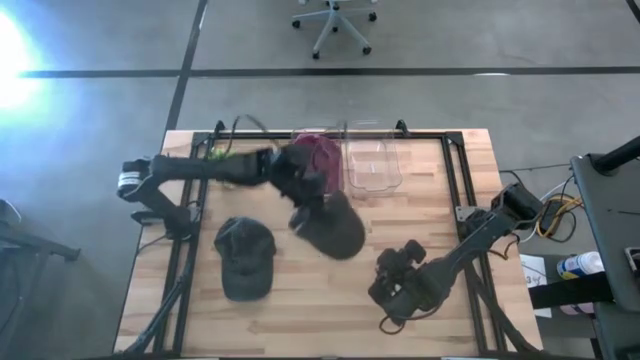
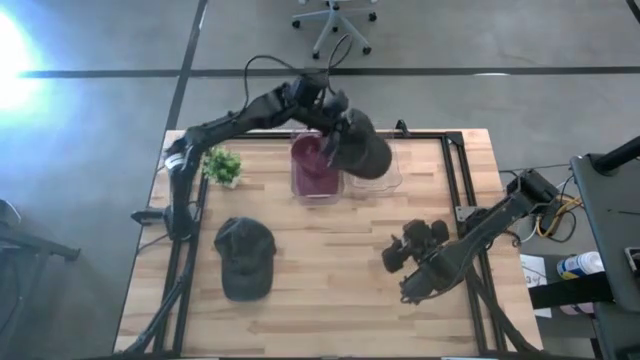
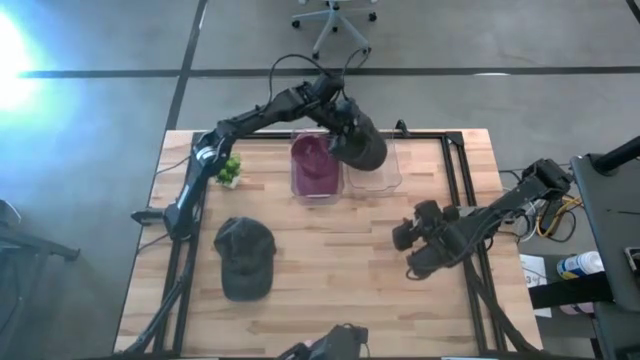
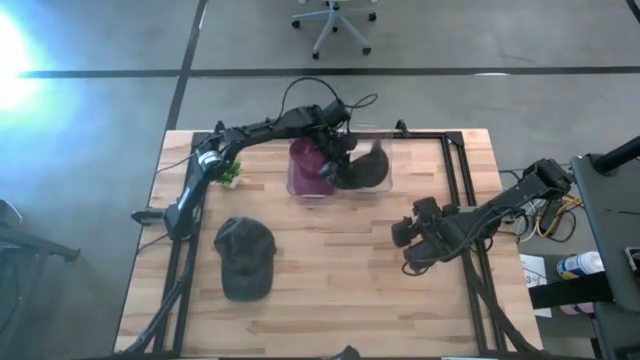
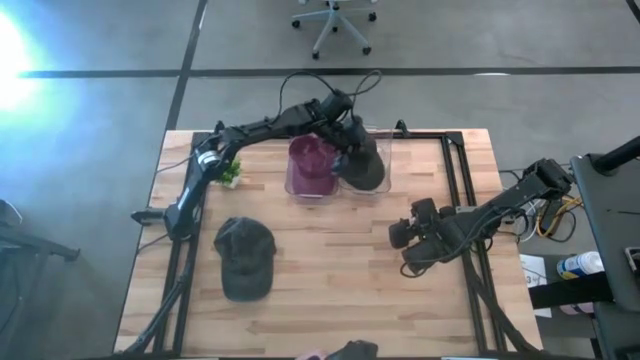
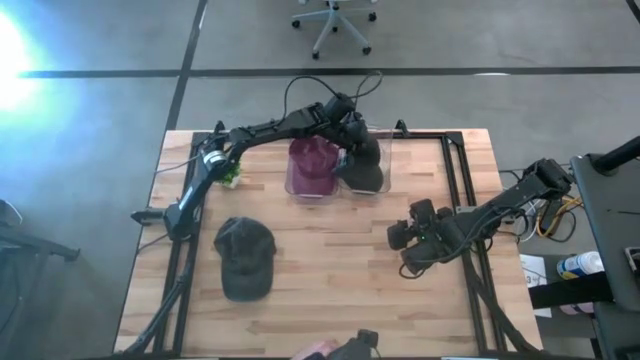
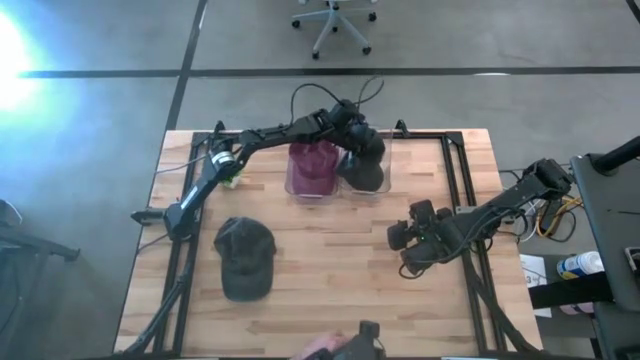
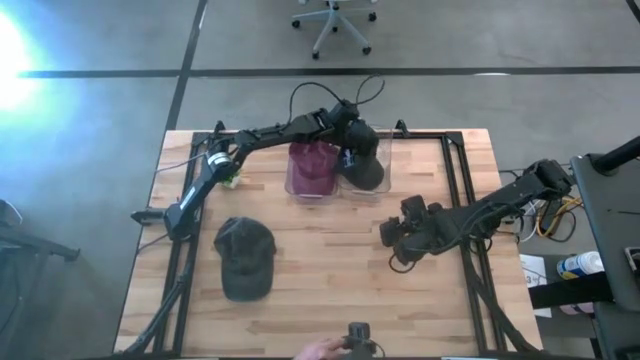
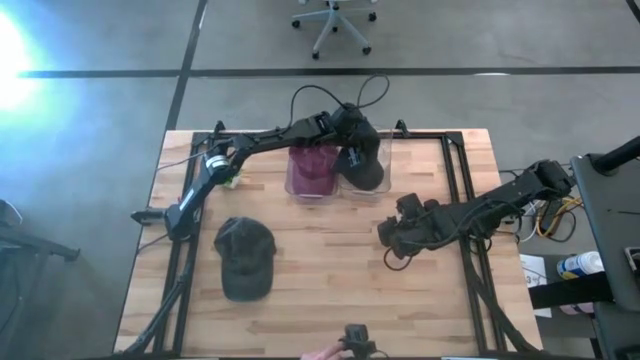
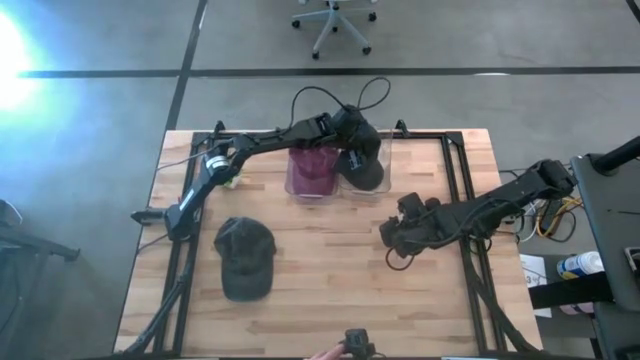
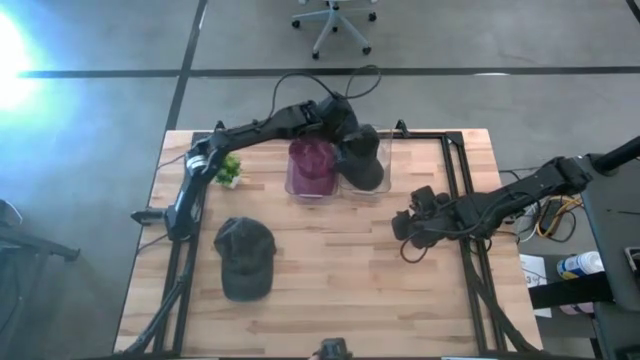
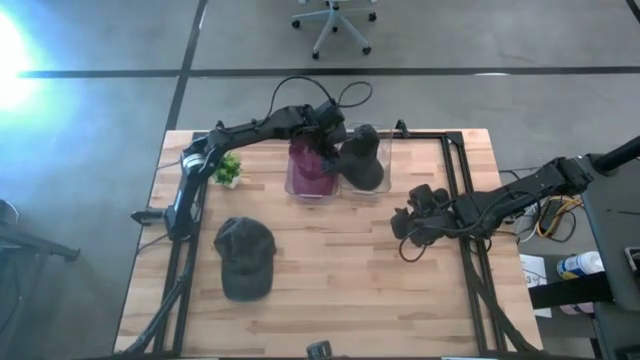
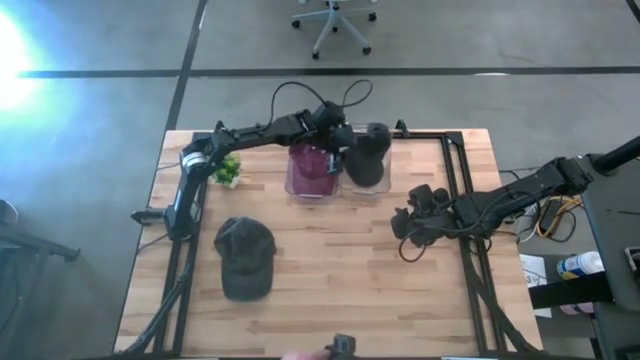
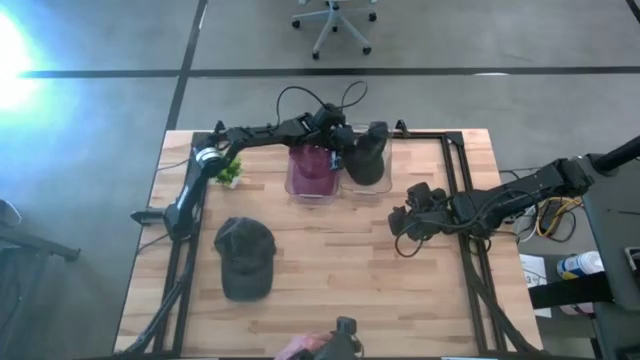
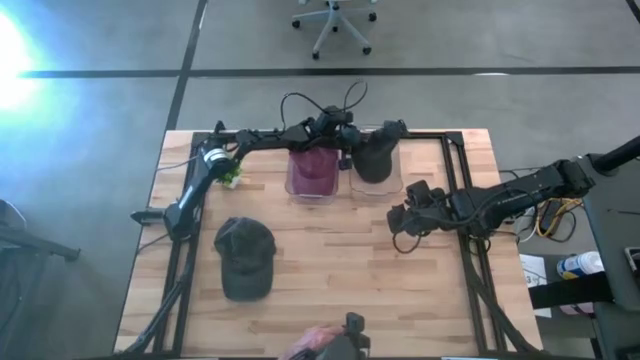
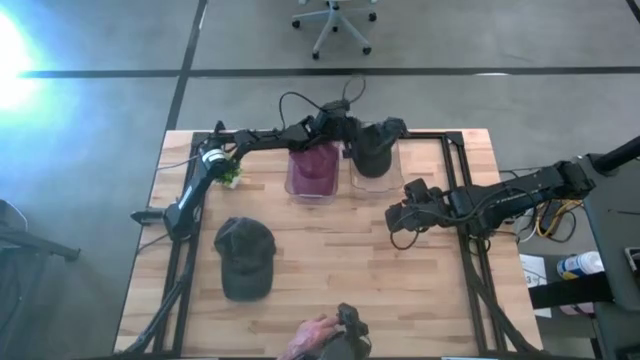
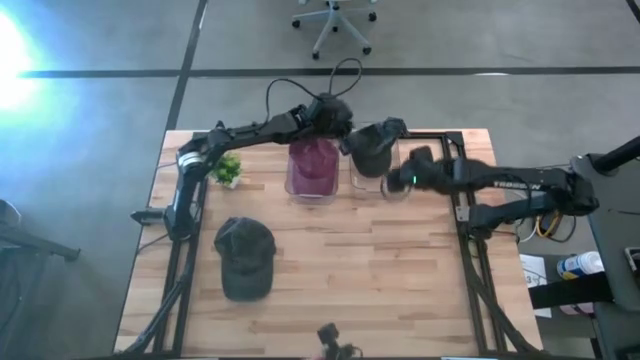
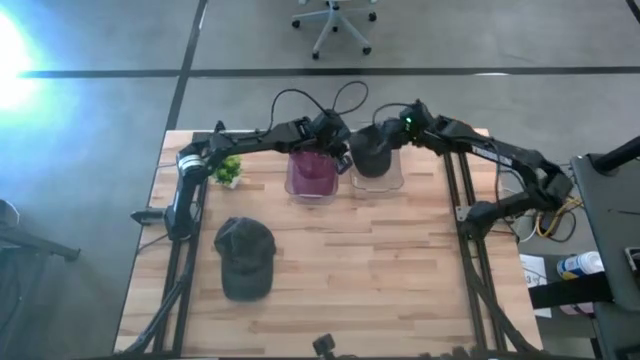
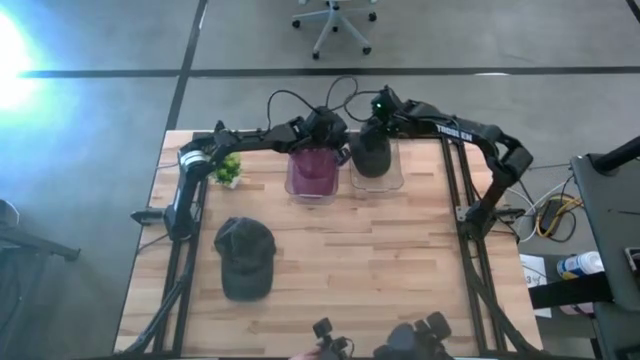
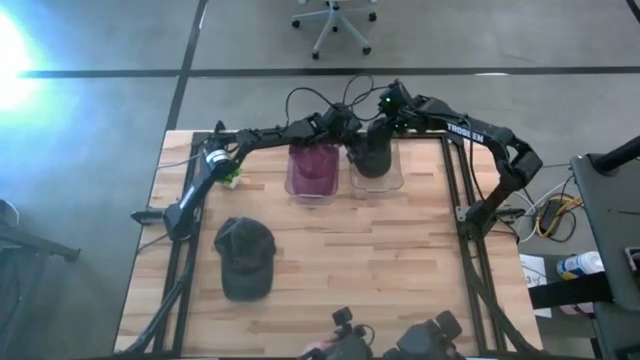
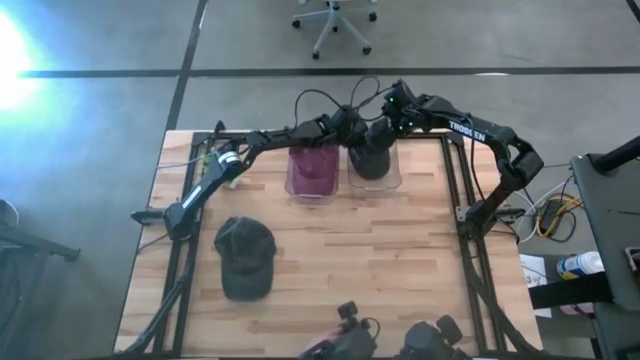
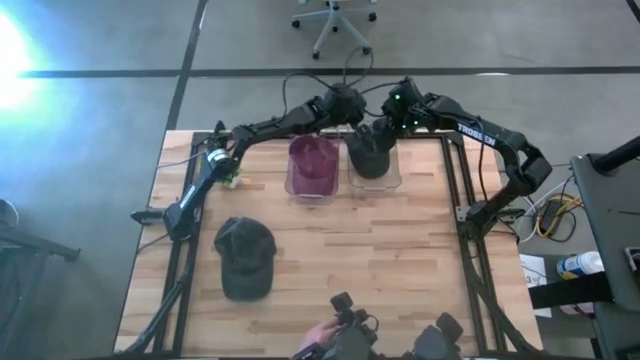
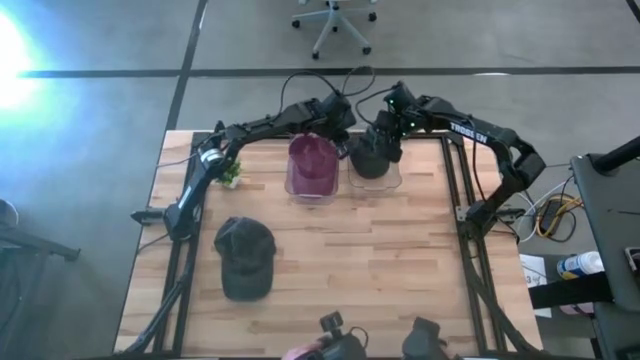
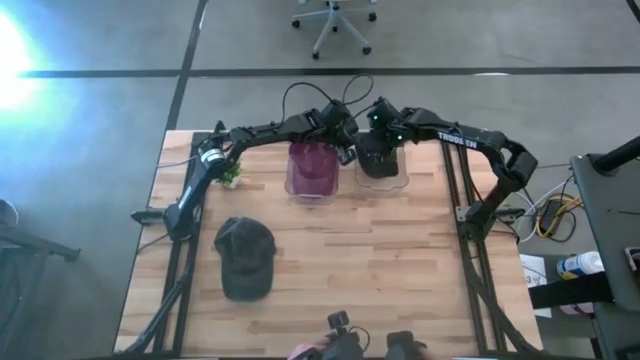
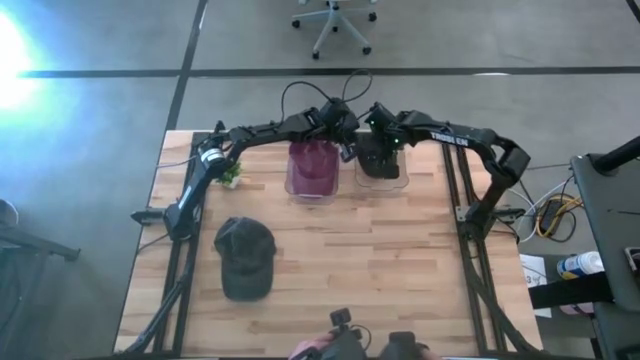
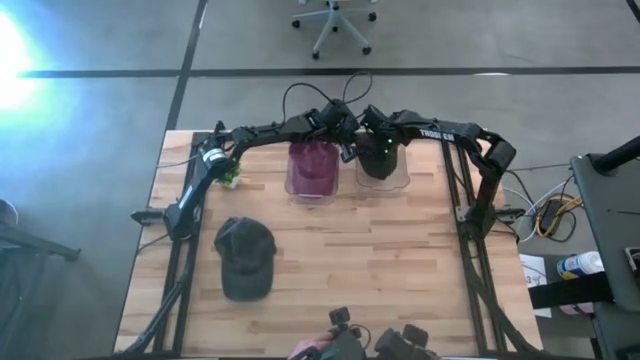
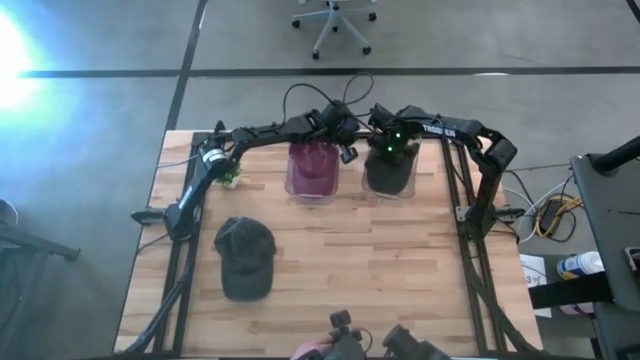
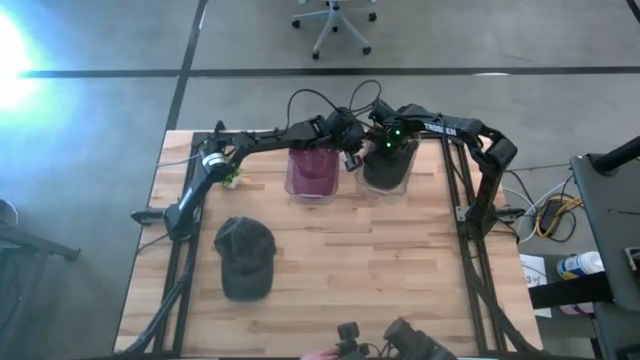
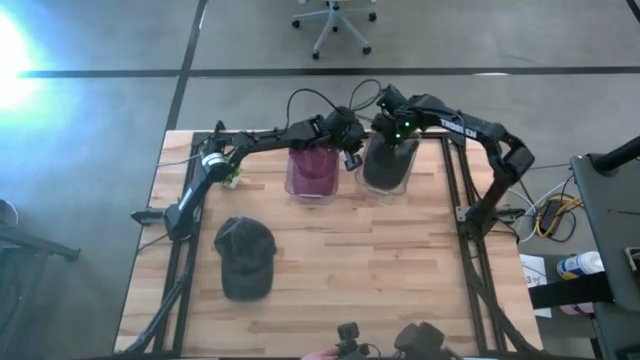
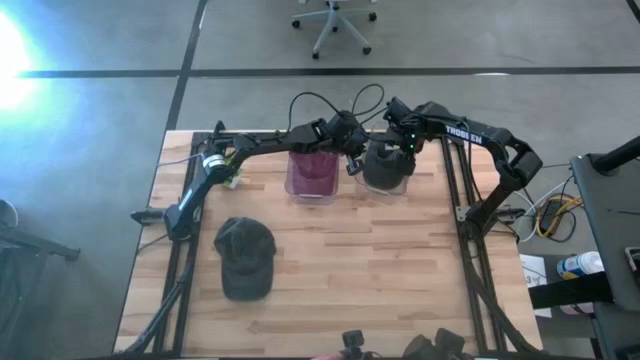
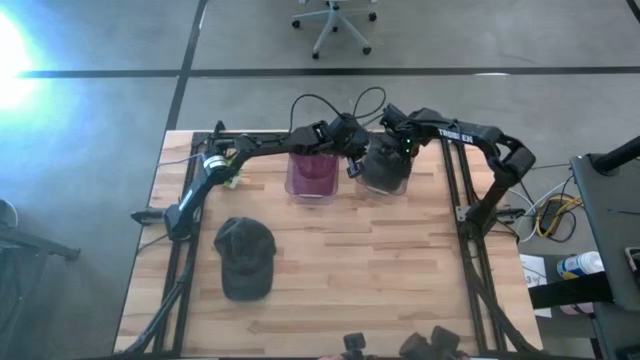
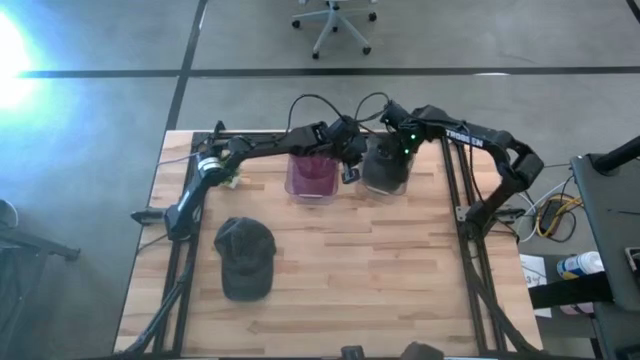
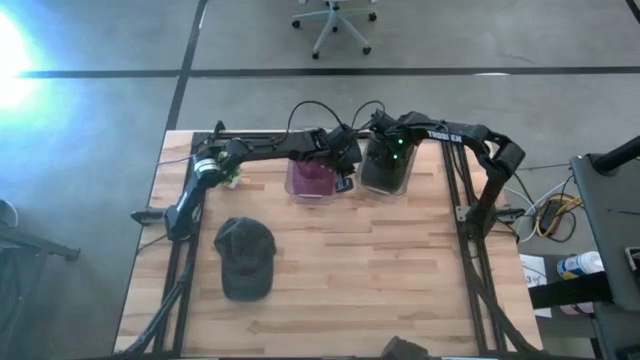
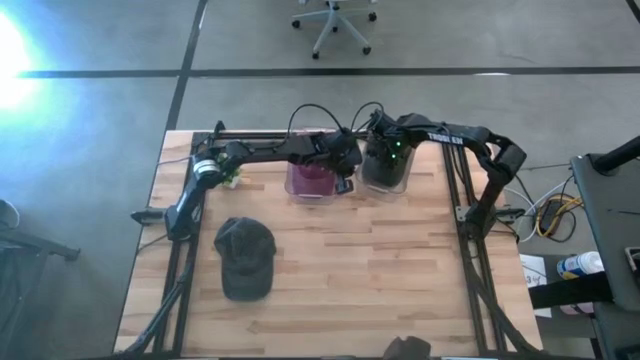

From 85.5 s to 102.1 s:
Task: Pick & Place hat
Put the right black cap into the right transparent bin

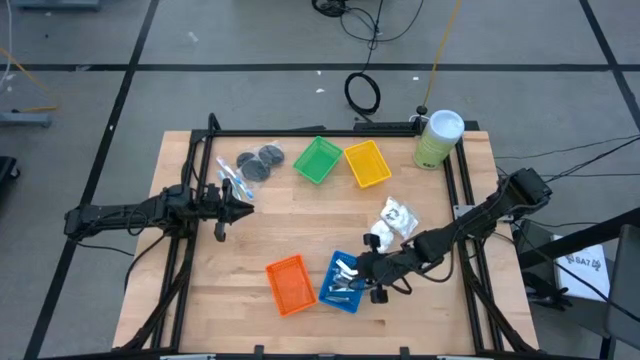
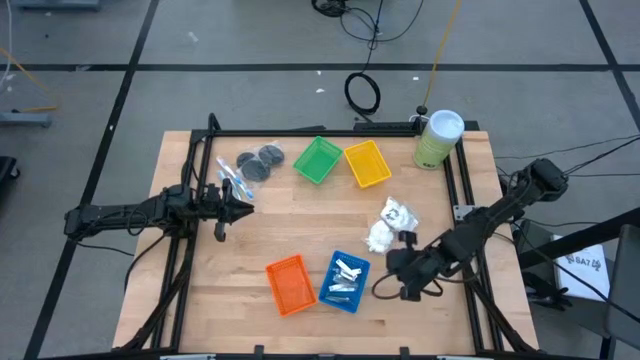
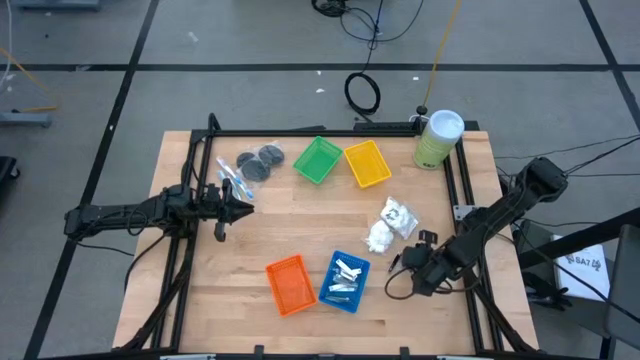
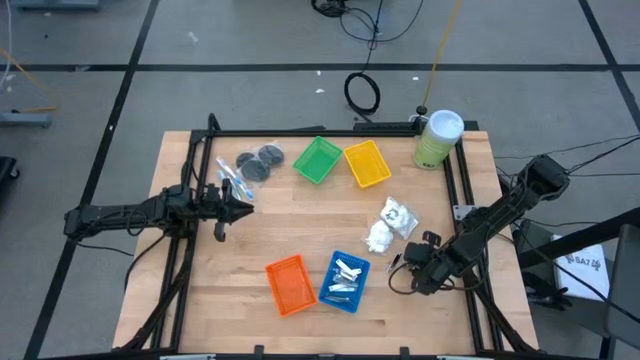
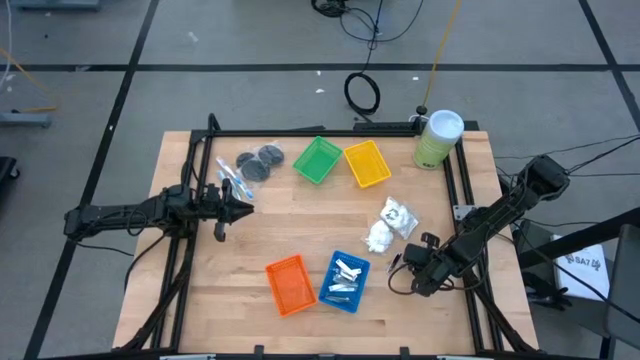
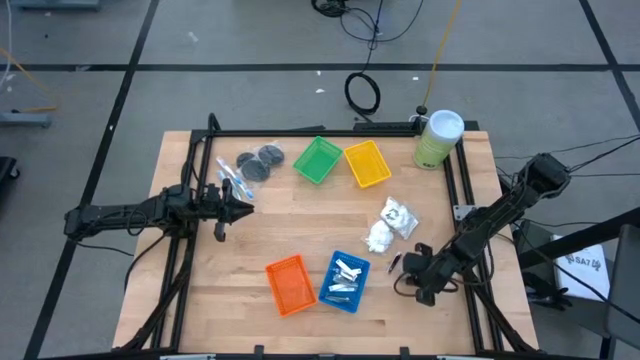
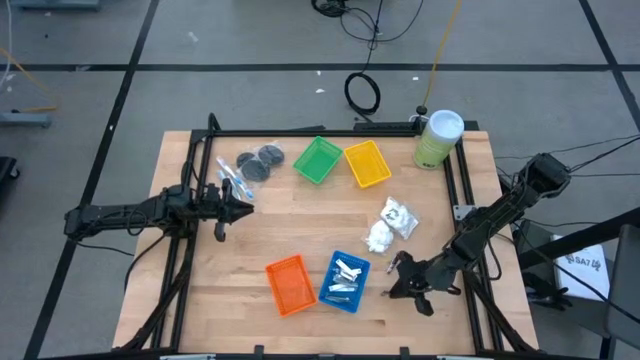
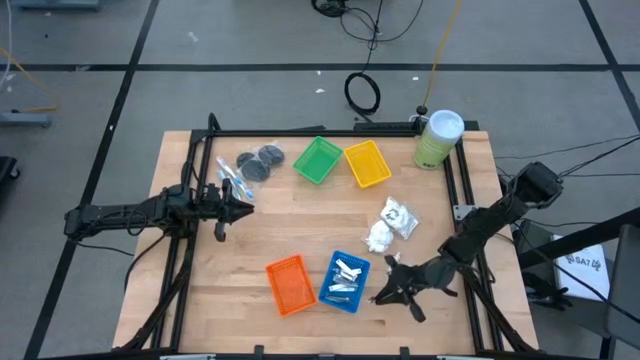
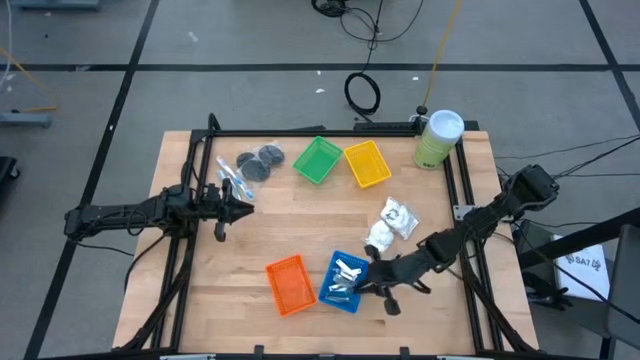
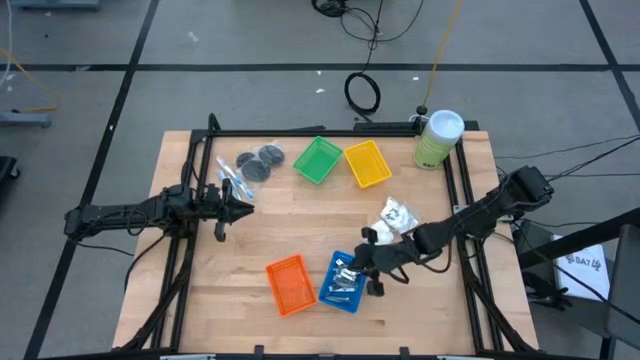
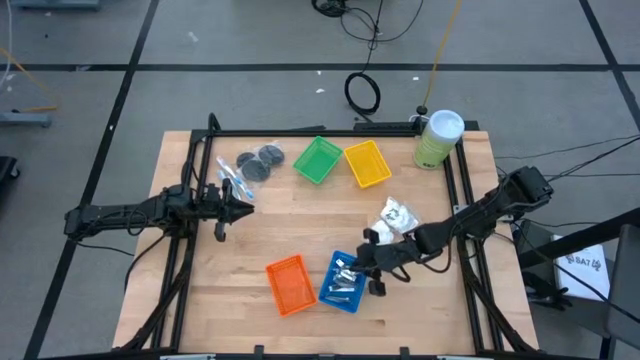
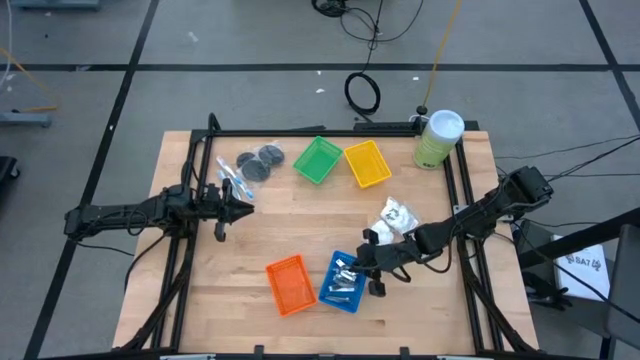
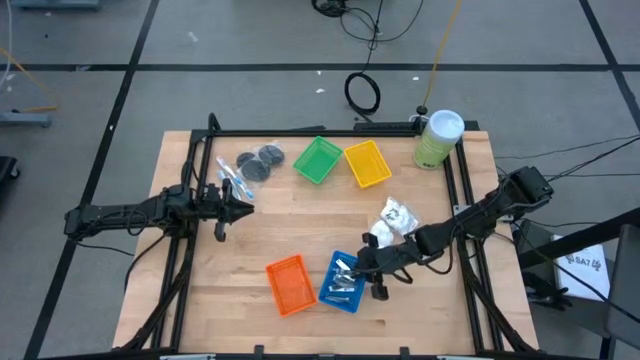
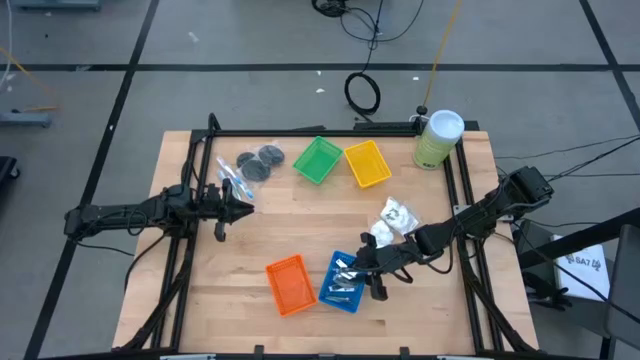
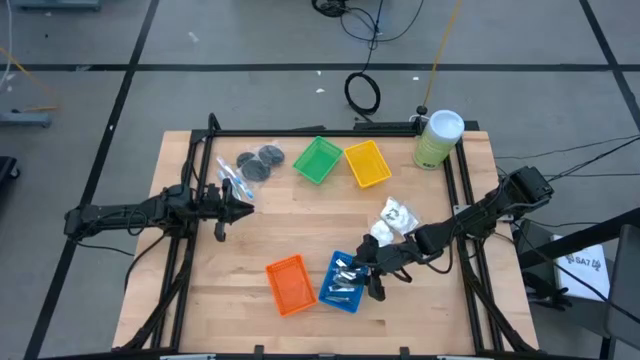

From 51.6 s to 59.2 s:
Task: Pick & Place Travel size toiletries
Put the silver nail cutter into the blue bin
